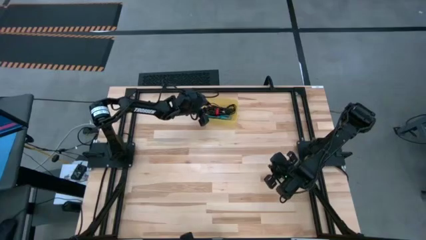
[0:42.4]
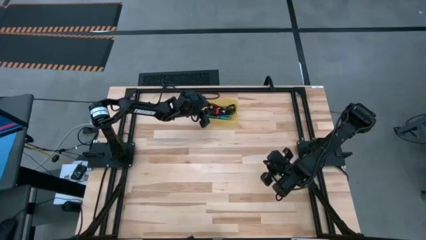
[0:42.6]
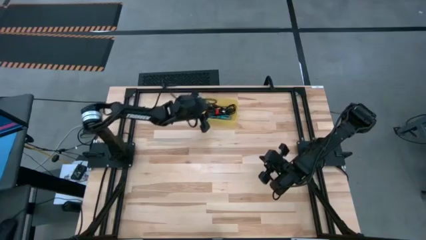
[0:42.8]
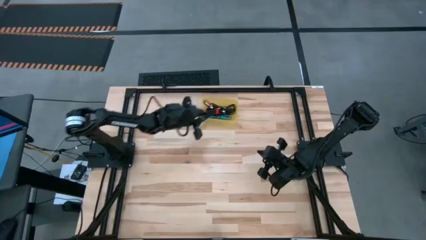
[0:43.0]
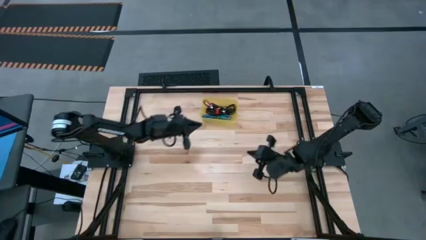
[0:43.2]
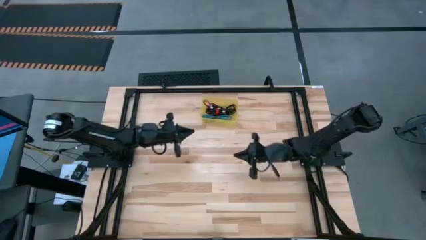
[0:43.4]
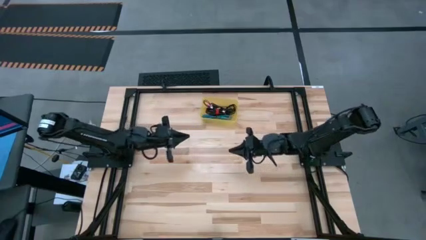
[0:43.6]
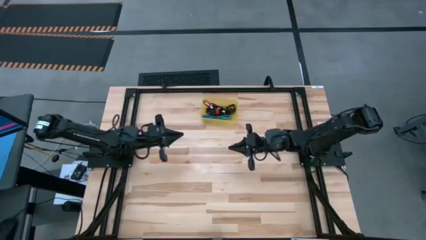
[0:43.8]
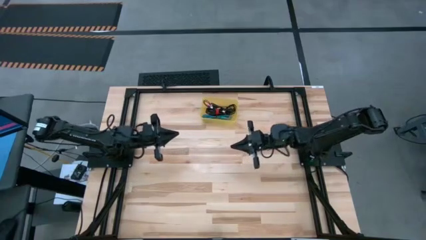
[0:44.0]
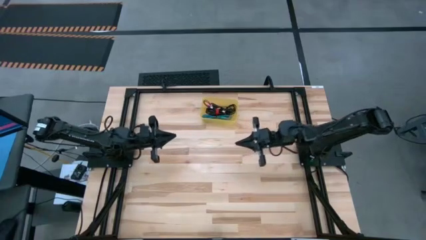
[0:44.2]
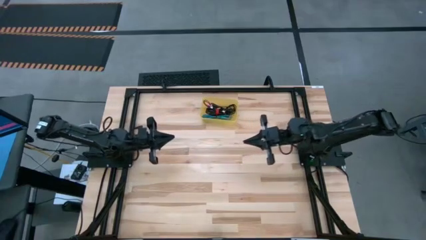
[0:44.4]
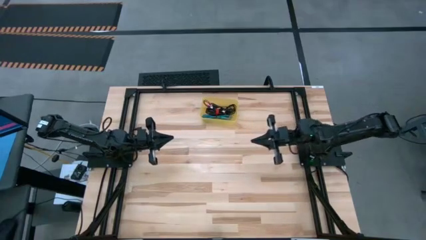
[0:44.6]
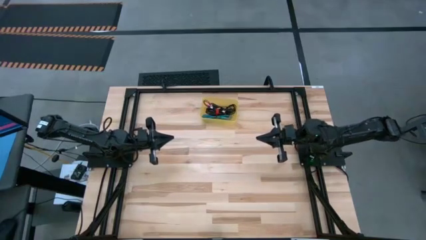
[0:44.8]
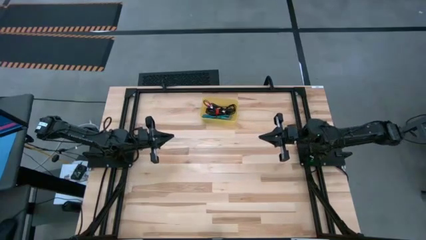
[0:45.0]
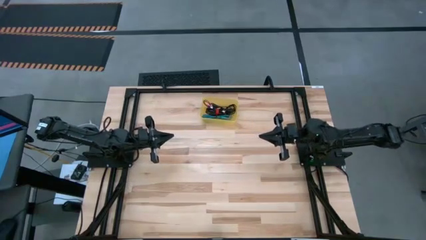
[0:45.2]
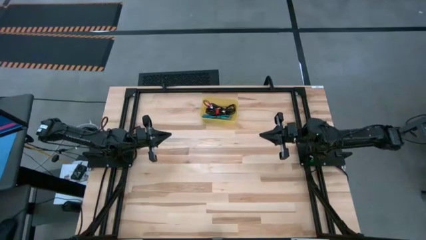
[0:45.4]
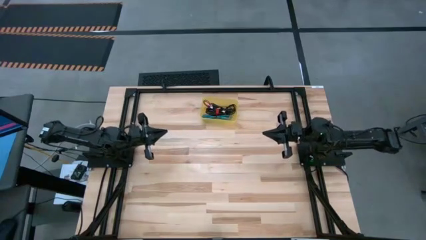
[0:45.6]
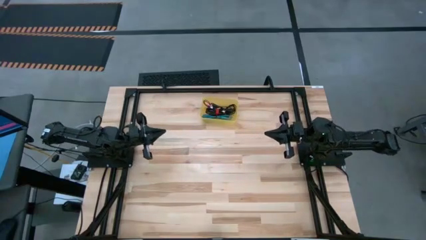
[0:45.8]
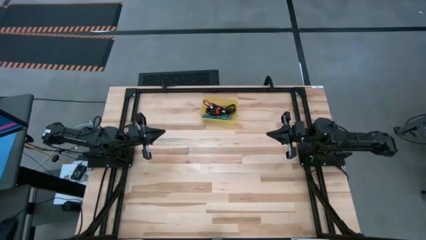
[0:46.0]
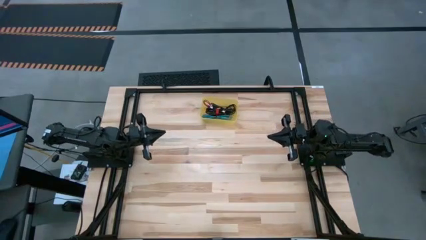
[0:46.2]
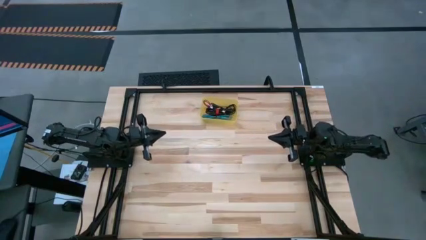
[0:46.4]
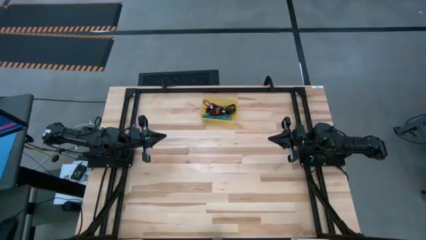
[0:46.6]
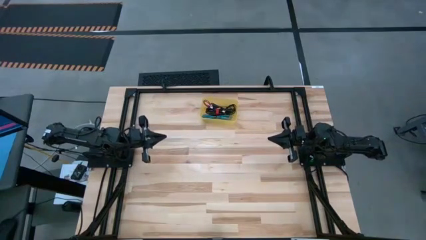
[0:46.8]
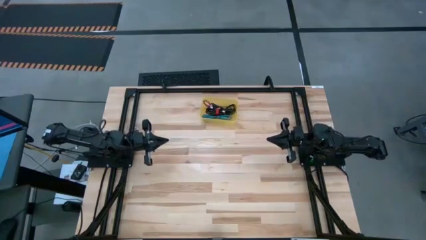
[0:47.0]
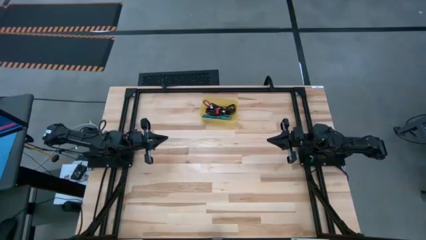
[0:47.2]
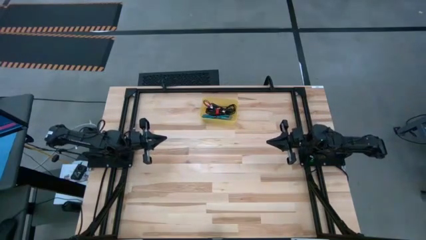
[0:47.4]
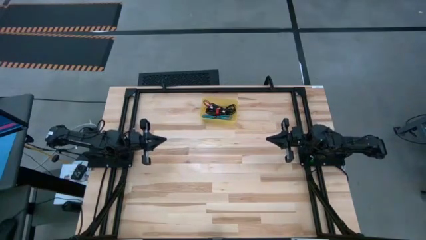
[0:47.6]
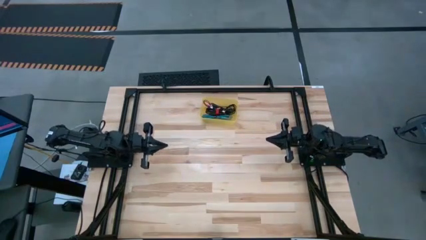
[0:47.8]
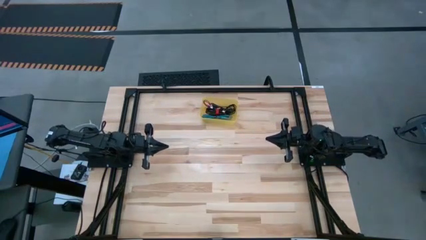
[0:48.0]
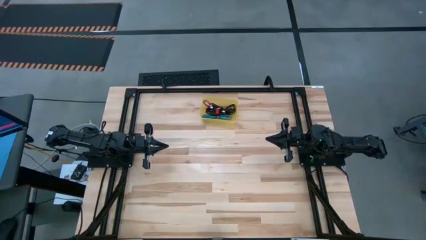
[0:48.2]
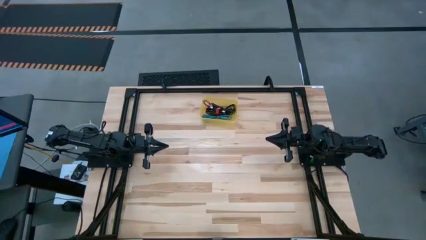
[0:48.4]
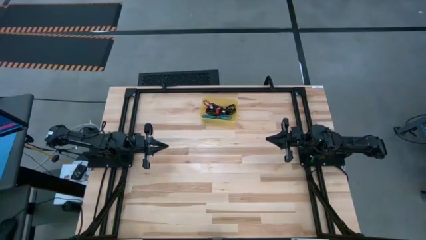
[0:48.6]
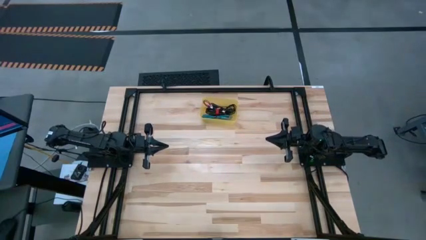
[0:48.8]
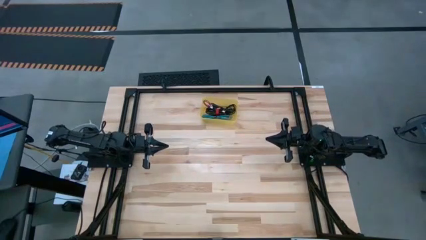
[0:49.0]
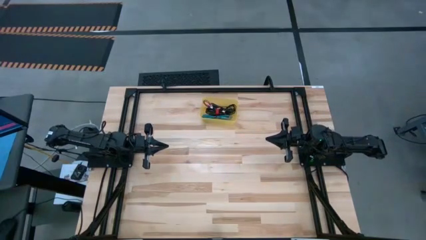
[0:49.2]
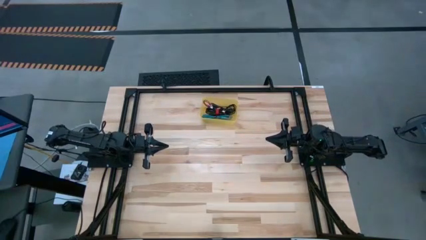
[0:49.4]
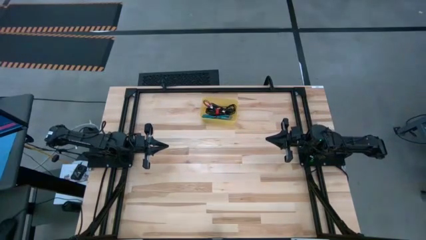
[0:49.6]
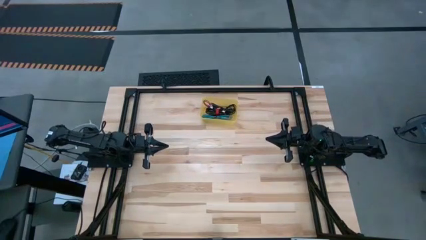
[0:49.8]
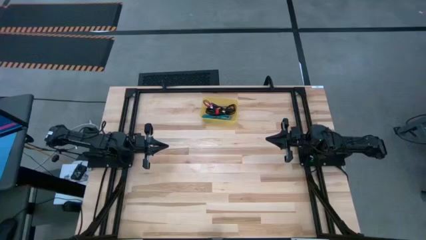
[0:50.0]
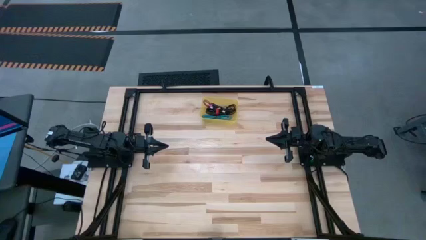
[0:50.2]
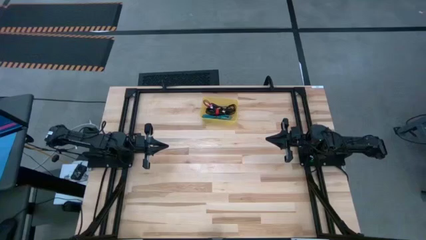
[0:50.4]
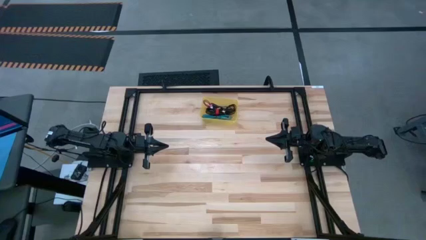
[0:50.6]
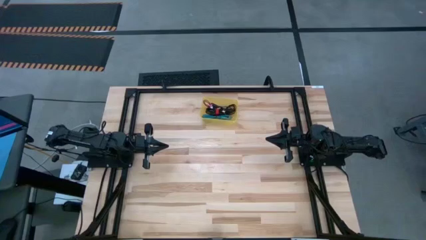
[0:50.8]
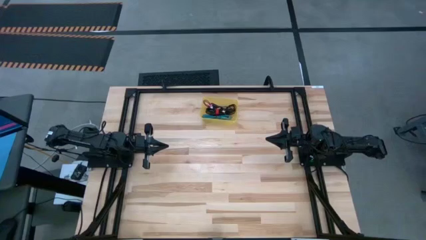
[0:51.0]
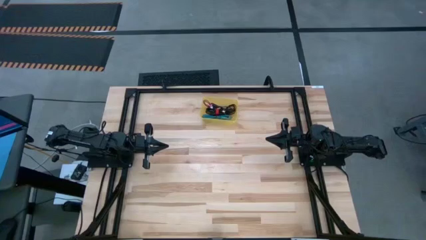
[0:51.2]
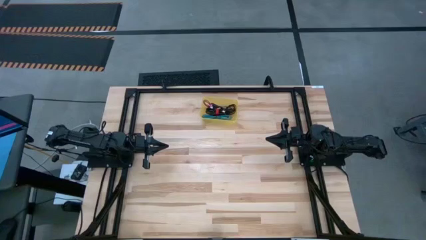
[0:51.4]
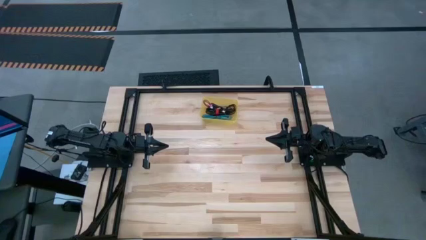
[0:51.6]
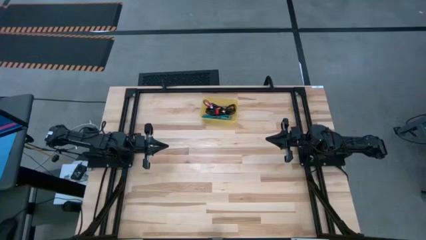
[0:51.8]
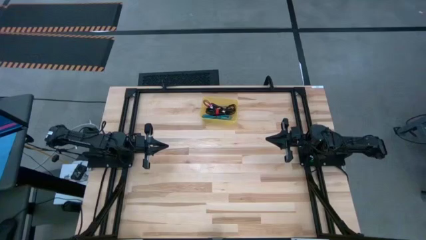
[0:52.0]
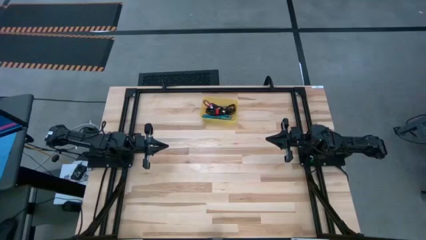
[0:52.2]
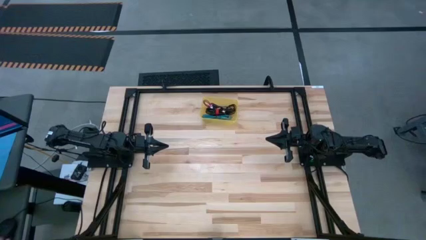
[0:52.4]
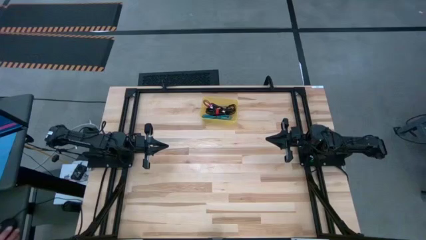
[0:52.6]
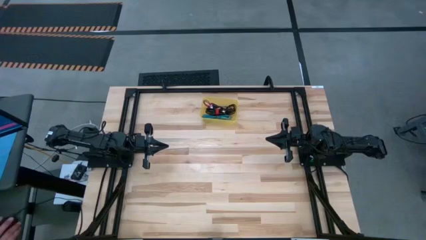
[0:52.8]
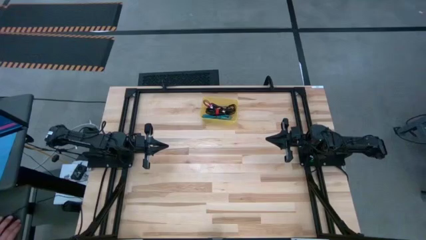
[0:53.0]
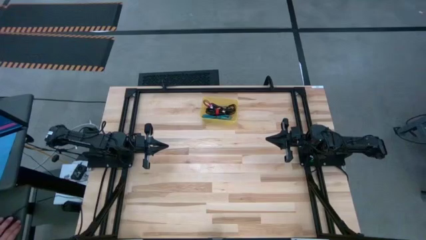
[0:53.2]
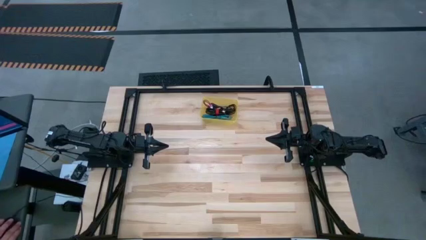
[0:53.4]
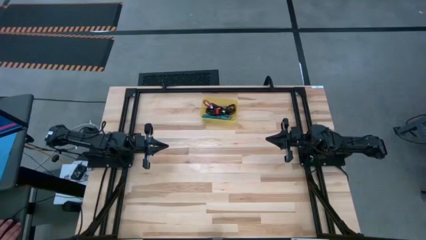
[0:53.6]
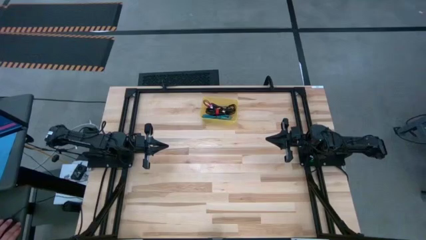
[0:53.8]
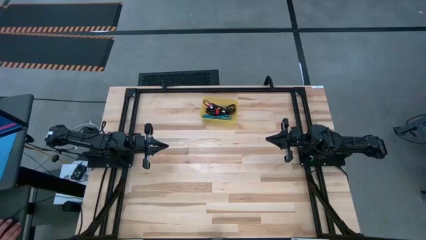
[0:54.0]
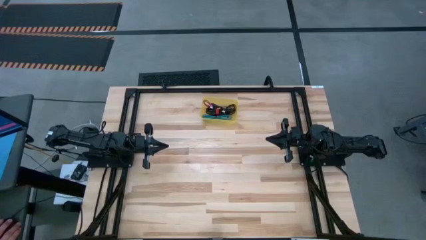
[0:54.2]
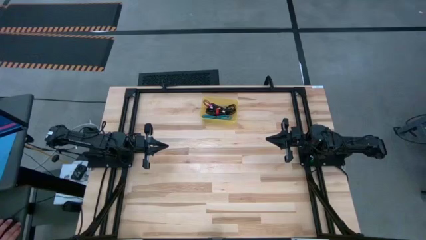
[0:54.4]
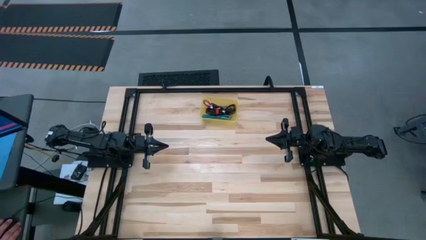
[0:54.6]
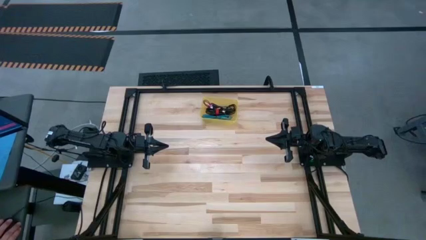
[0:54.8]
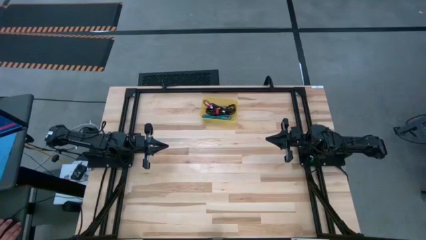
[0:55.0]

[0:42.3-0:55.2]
Task: Pick and place USB-C Cables
Return to Home Position

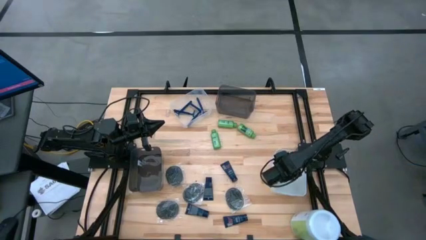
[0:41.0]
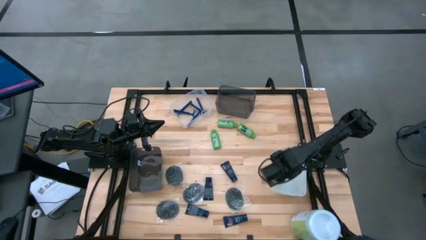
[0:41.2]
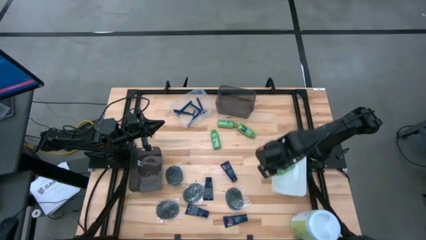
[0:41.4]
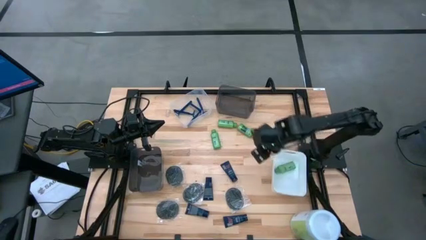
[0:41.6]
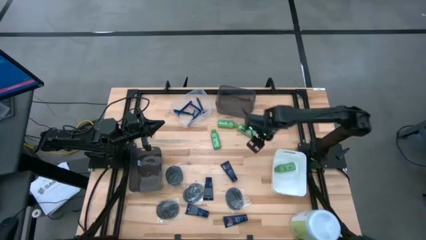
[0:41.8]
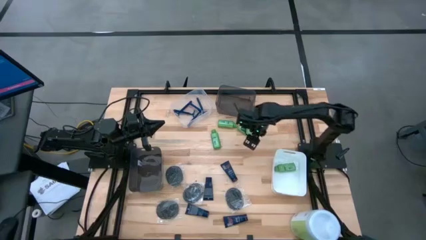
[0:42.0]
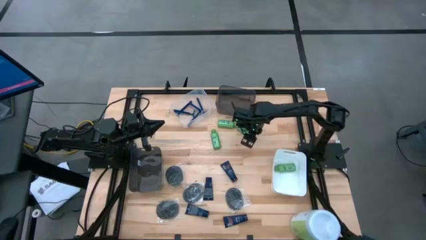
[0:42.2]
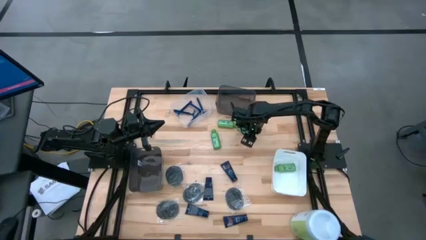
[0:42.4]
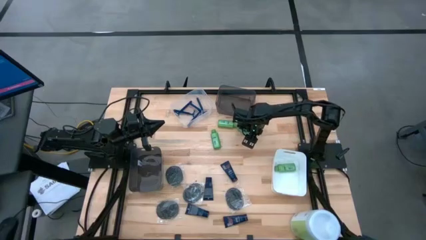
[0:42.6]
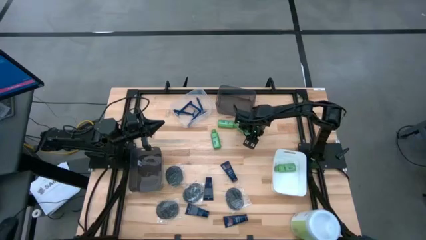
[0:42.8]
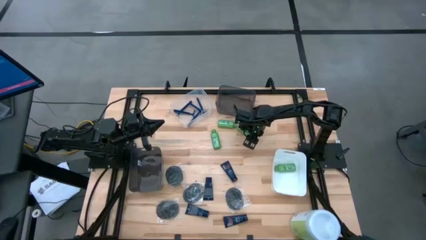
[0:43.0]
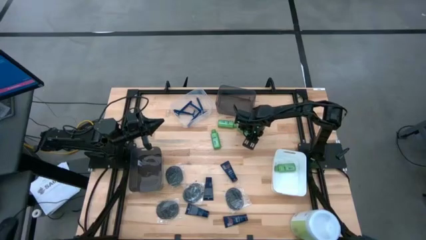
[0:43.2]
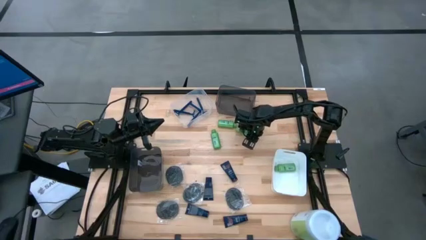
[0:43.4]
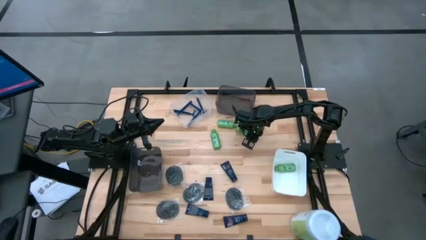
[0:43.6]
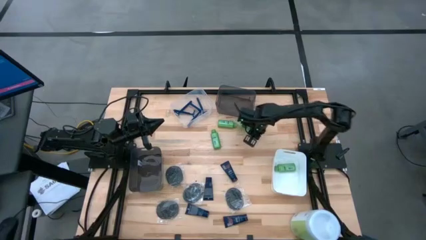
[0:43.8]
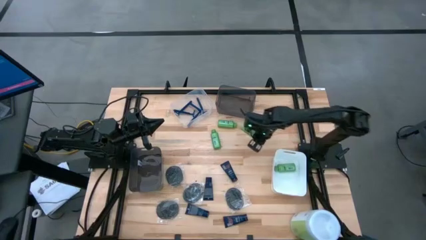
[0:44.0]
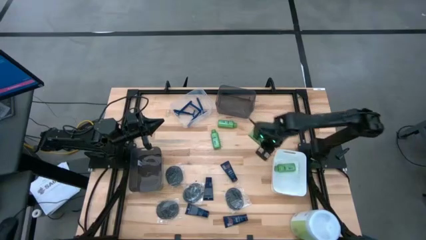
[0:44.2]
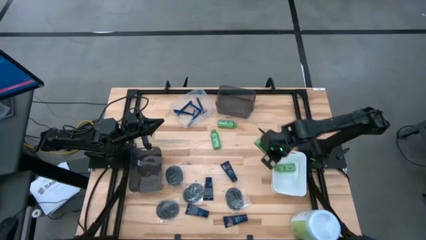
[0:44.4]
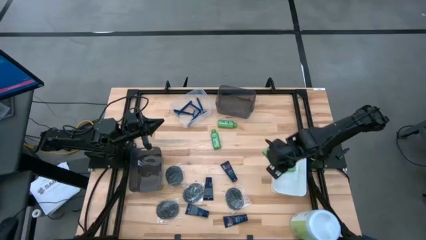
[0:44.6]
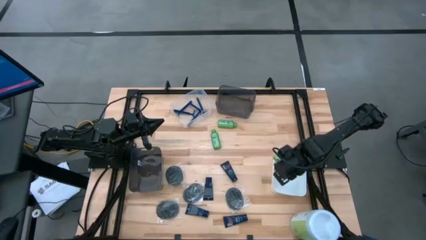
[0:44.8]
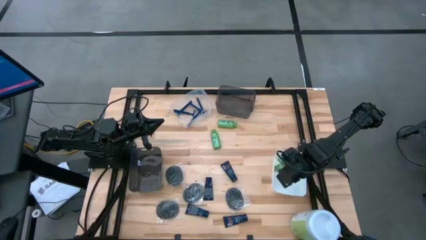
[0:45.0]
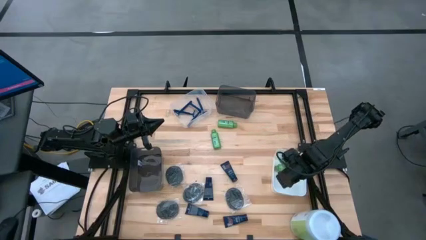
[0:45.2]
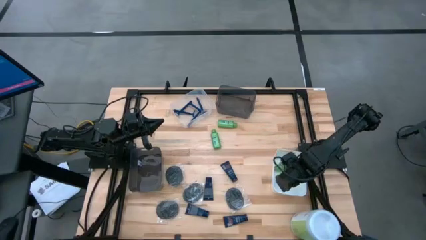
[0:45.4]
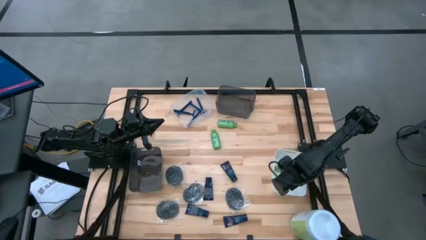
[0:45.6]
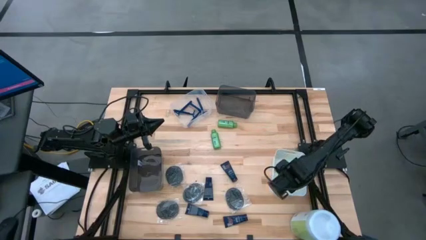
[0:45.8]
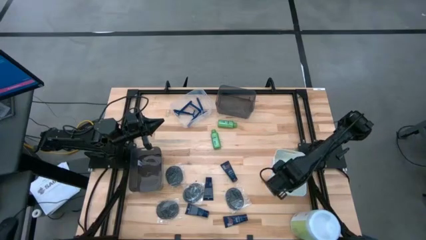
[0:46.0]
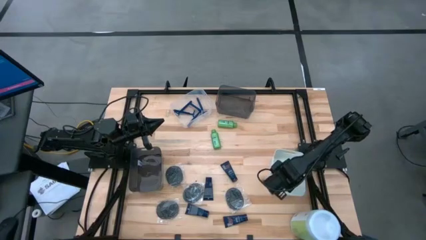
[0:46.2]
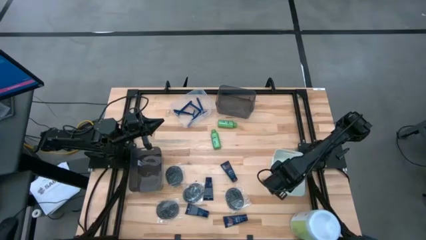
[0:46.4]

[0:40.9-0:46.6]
Task: Pick & Place Travel size toiletries
Put the green shampoo into the white bin
